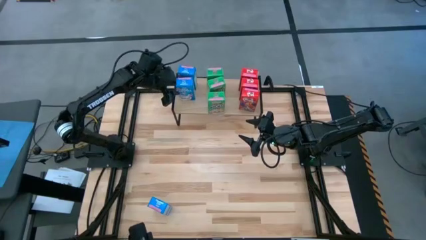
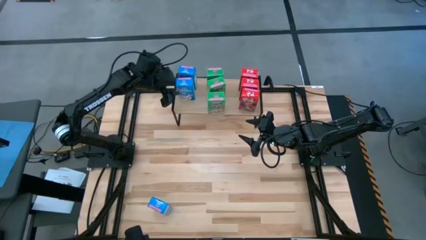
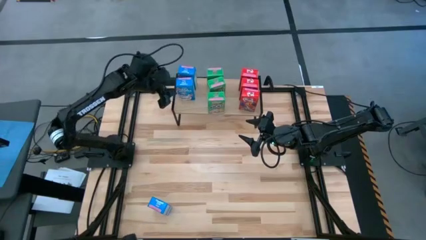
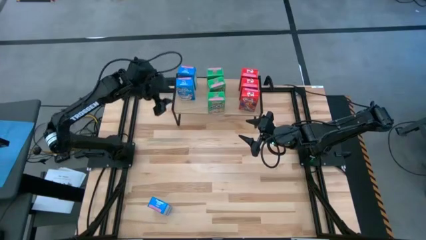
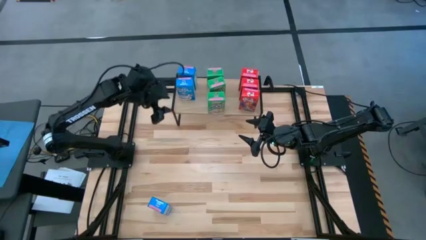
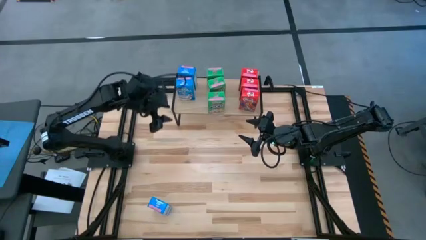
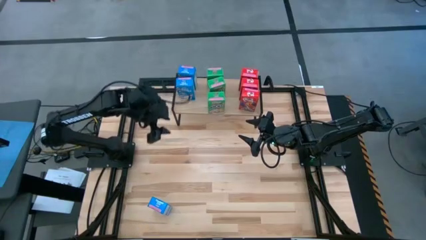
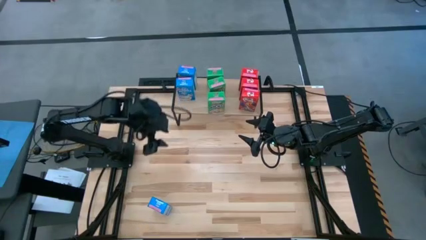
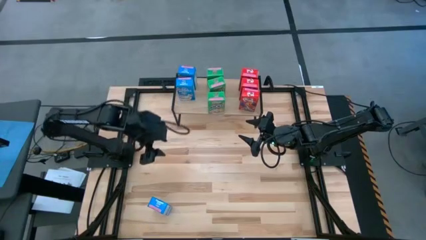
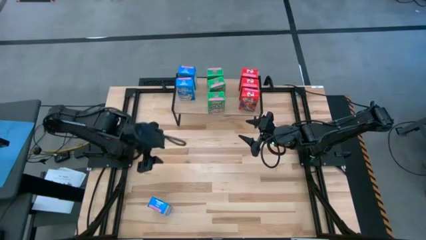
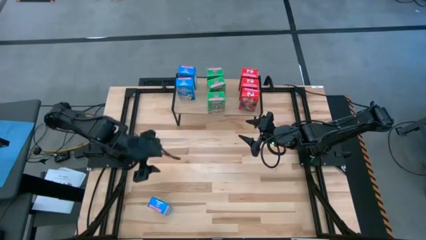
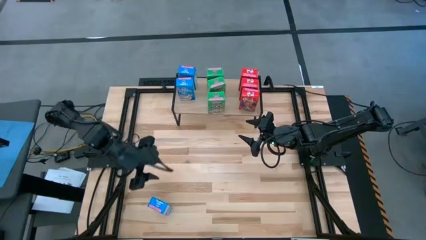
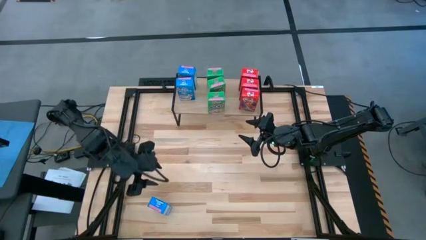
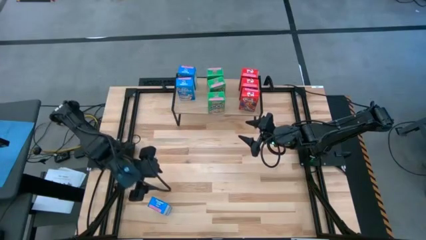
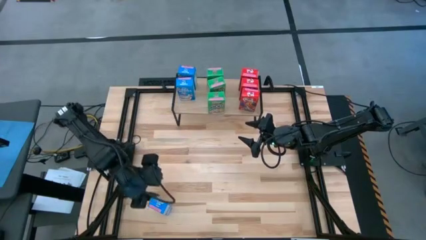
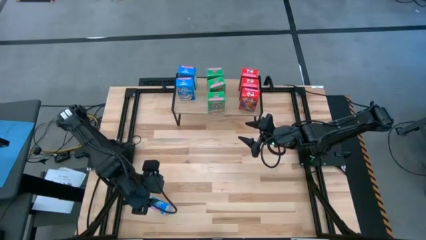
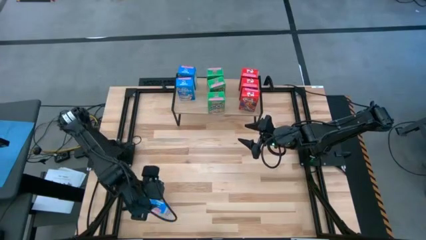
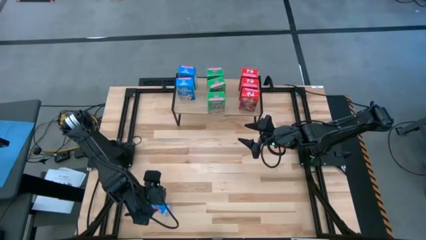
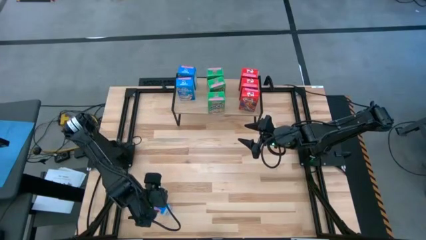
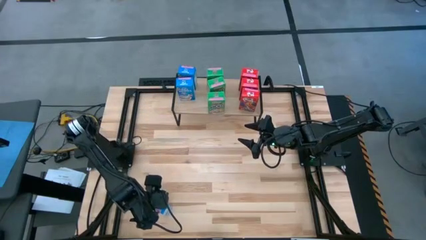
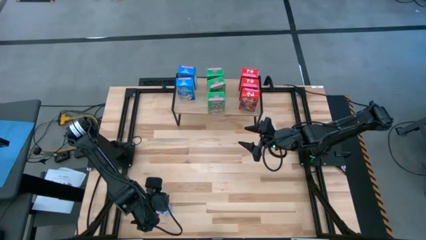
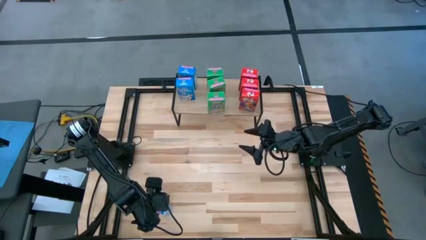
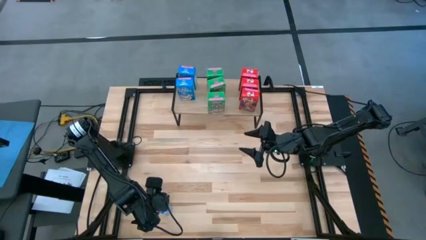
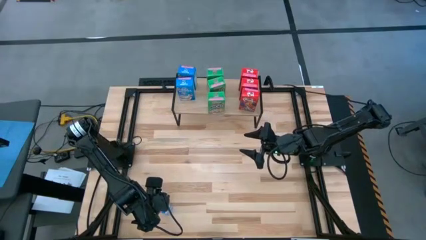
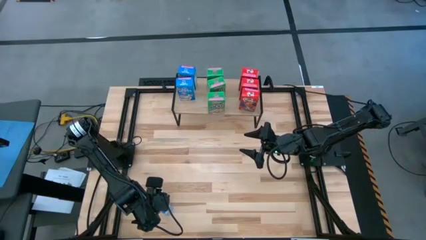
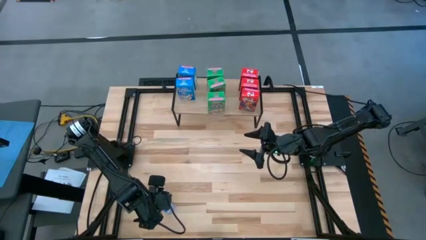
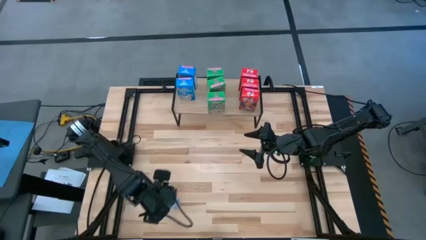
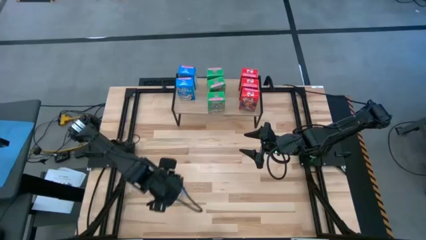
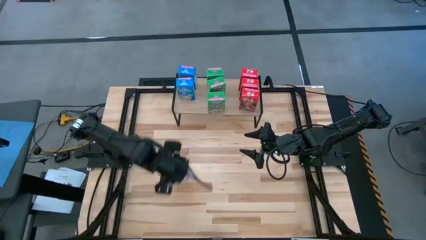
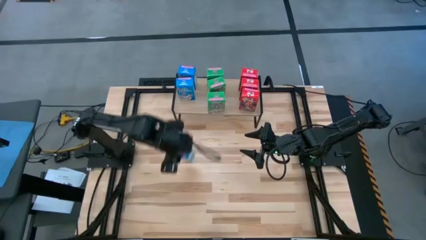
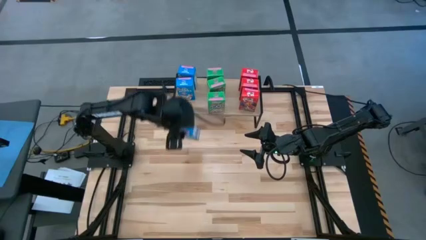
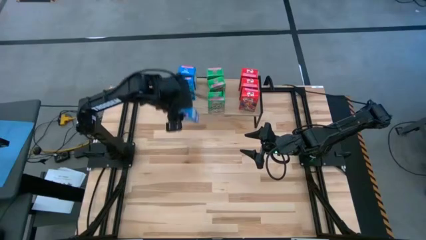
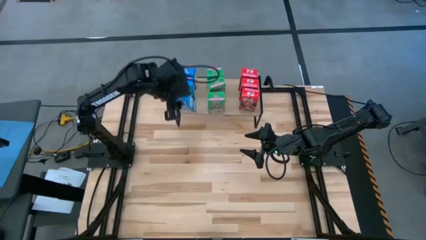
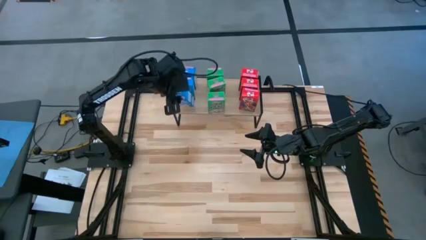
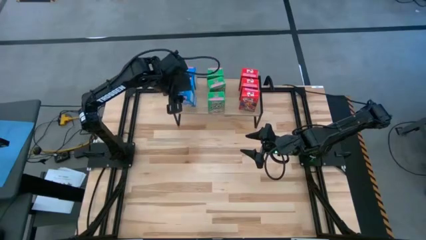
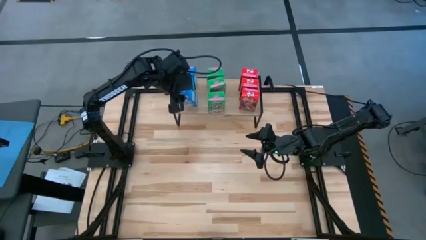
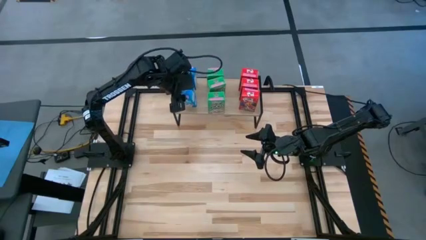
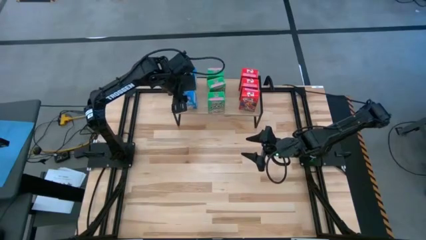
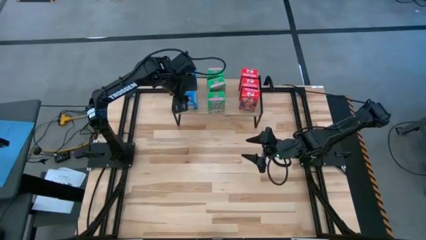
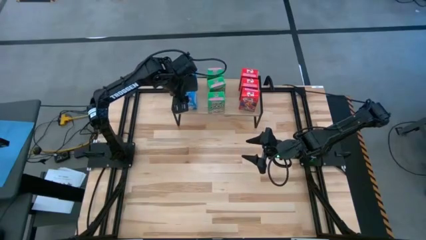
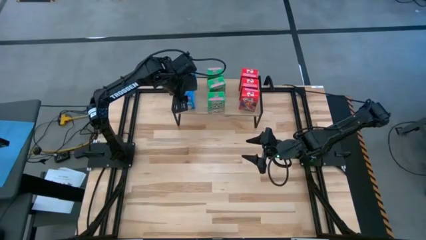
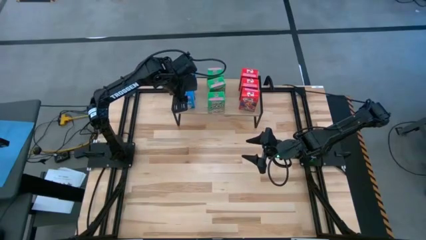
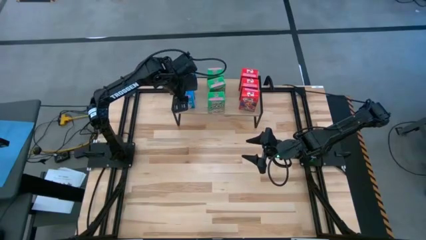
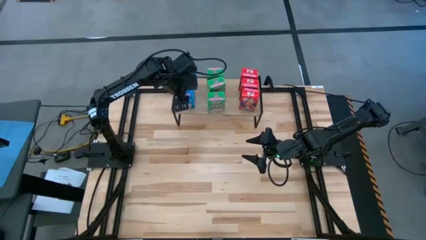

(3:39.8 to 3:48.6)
Task: Stack cereal on shelf
Put the blue cereal box on the shelf aligned with the blue cereal boxes

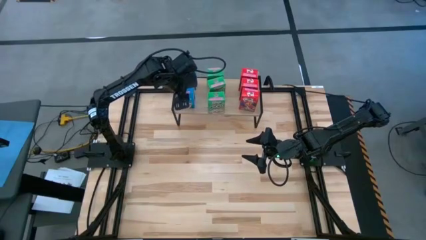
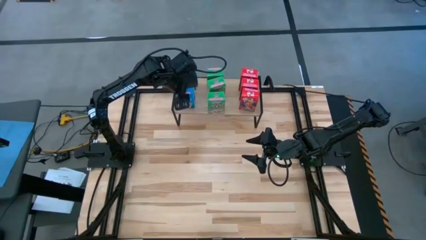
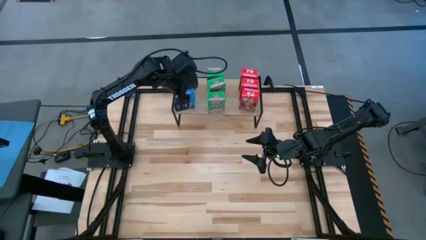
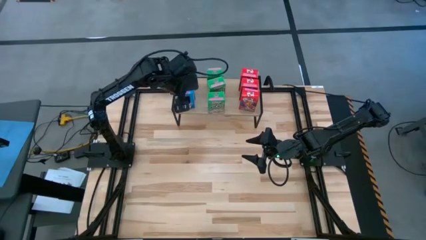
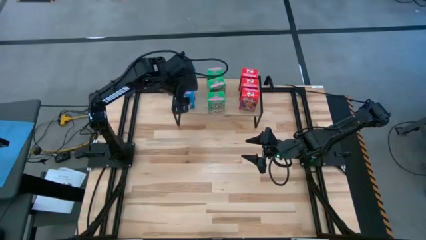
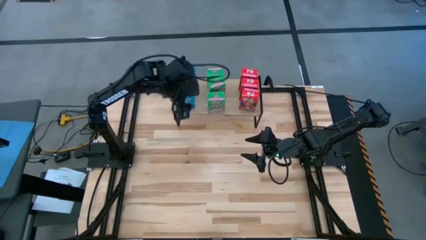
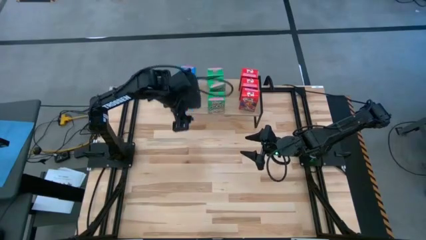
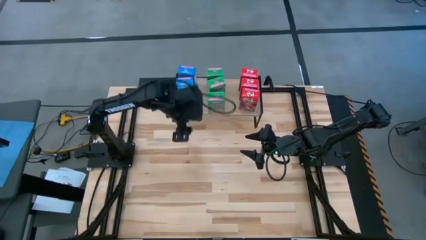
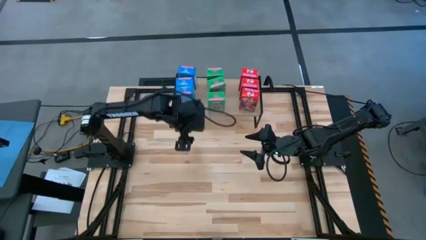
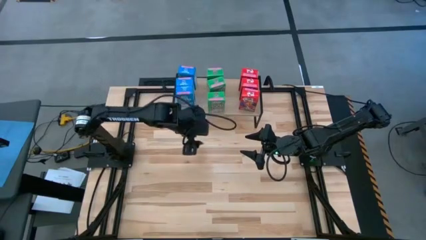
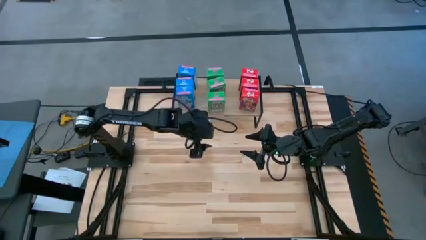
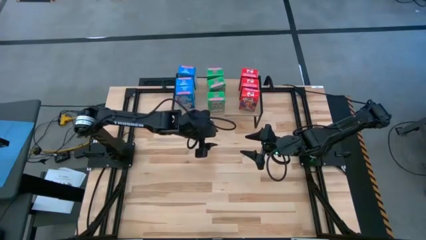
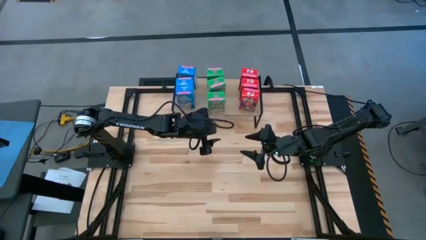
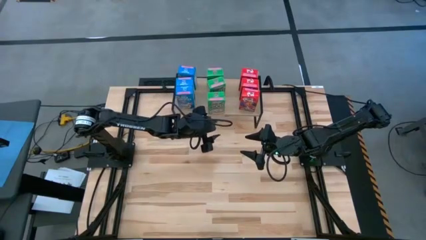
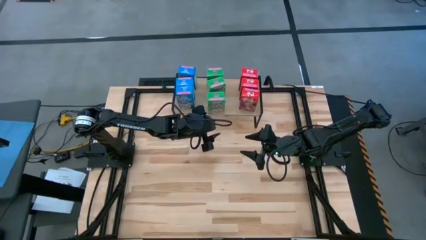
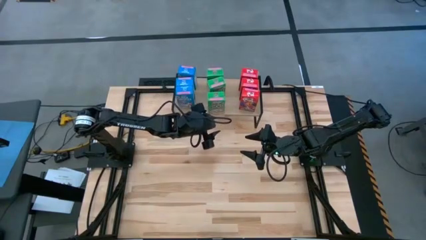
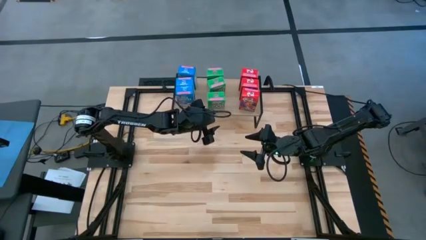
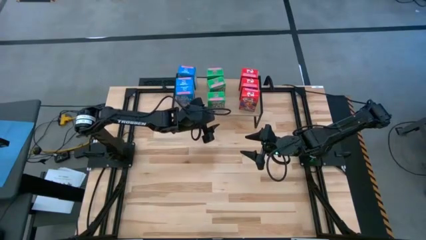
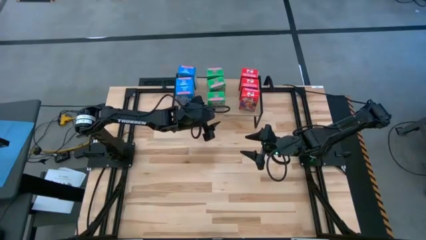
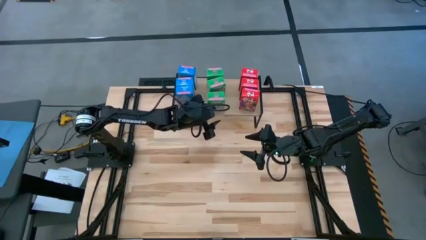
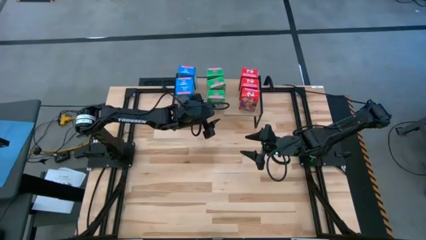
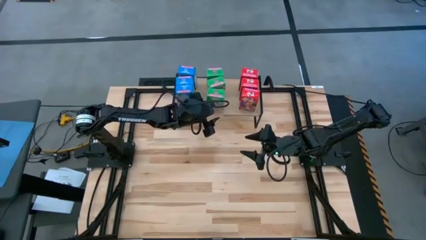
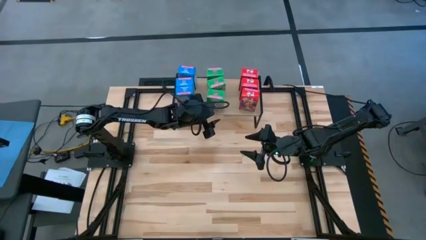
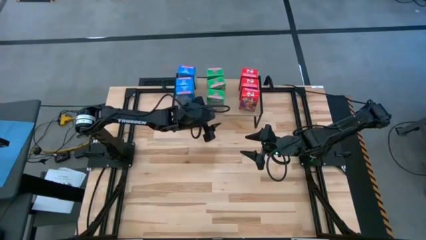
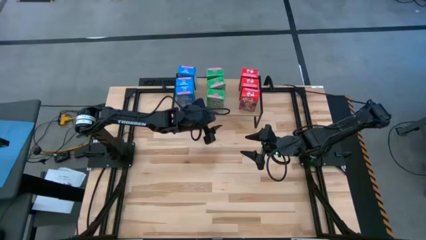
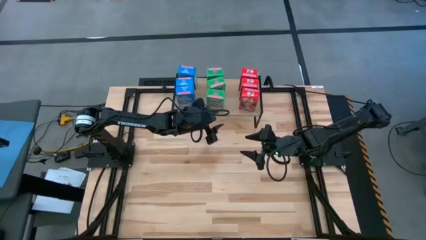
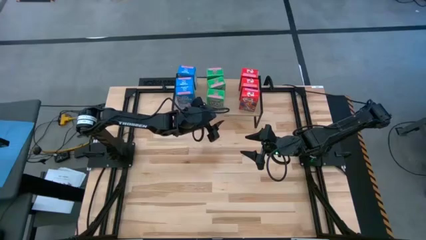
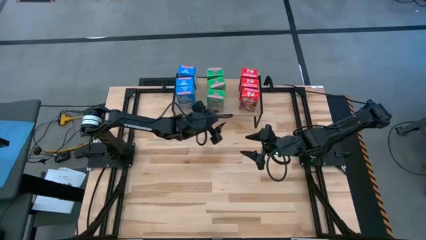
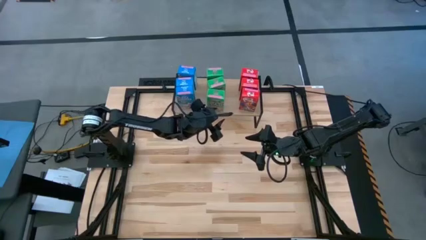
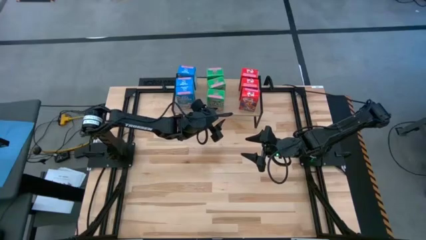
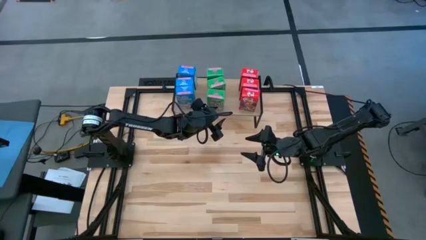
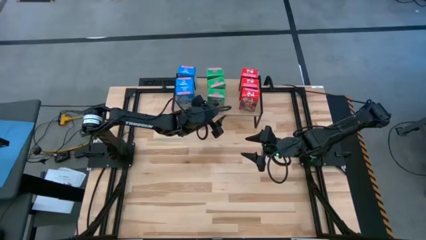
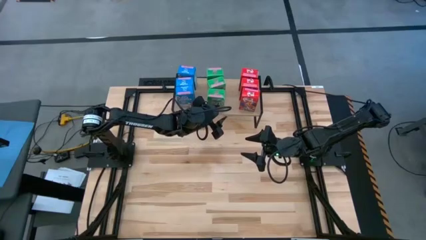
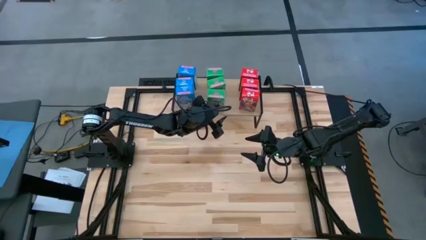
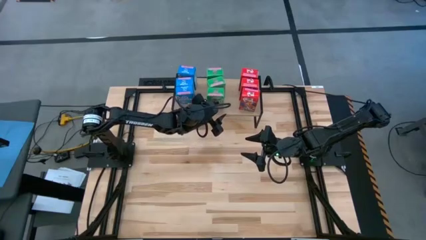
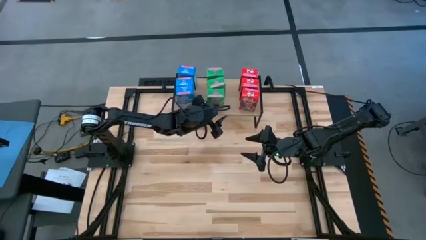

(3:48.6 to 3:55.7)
Adjust the green cereal box on the shelf

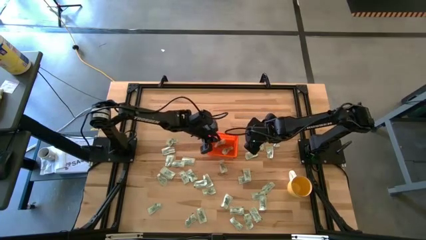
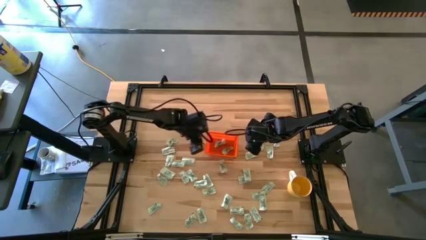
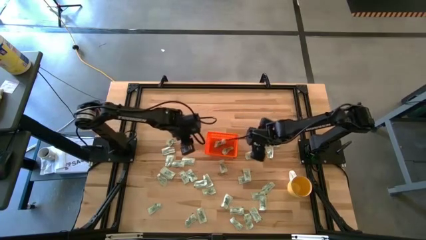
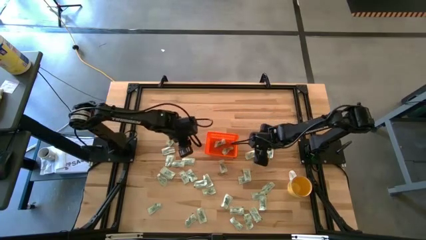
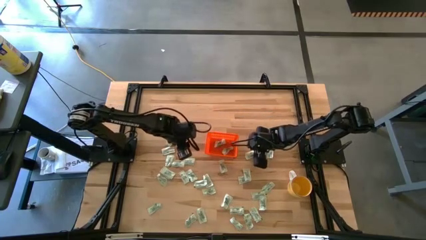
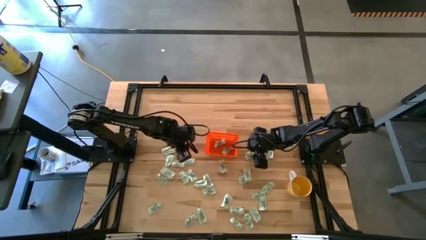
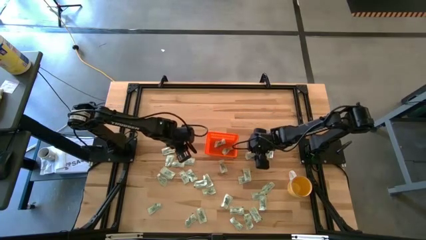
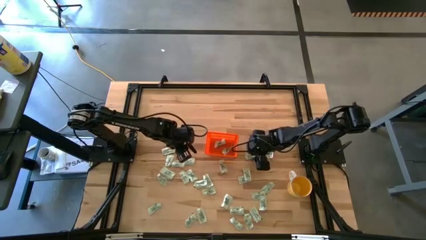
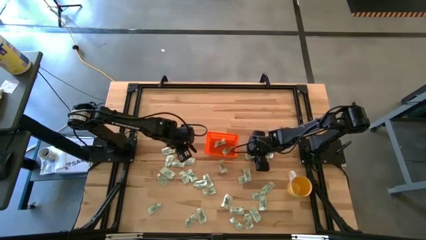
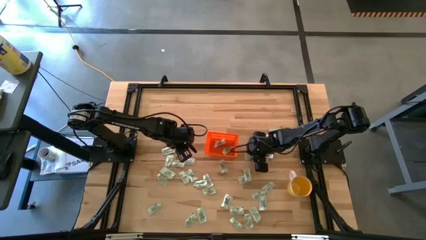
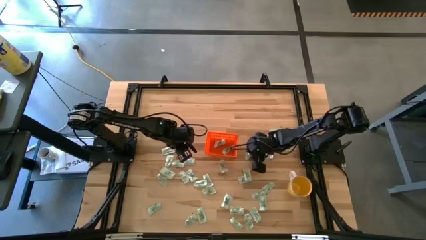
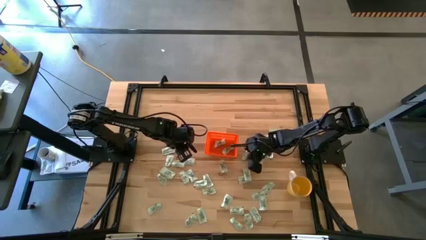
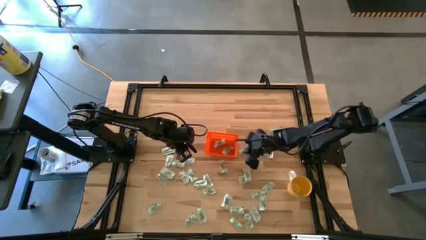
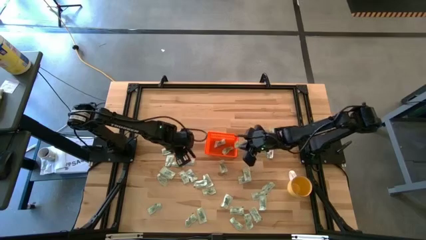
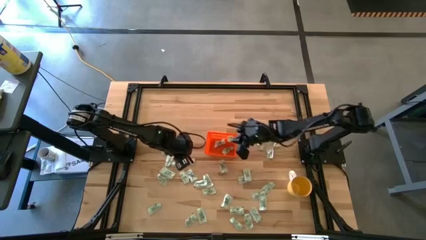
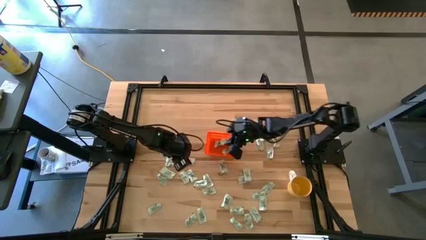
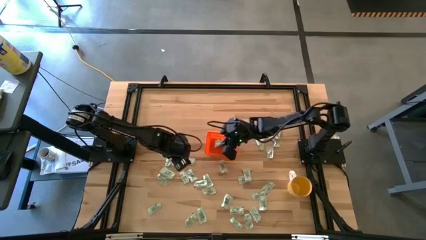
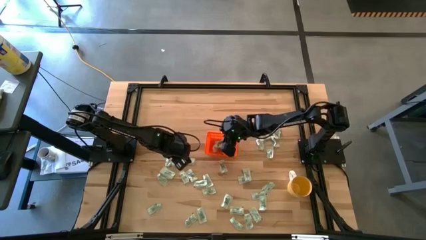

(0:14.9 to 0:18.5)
Task: Pick and place Stevia / Truvia into bins
Put the light green stevia packet into the orange bin
